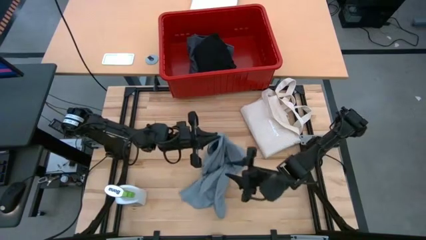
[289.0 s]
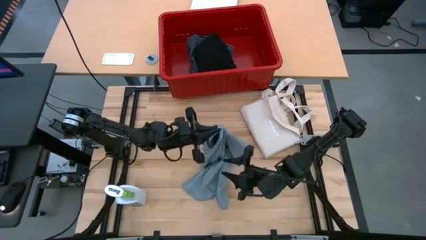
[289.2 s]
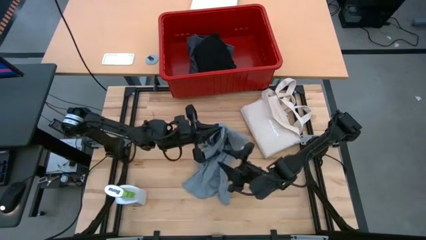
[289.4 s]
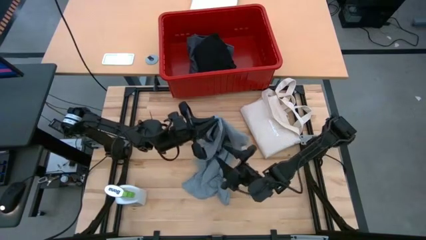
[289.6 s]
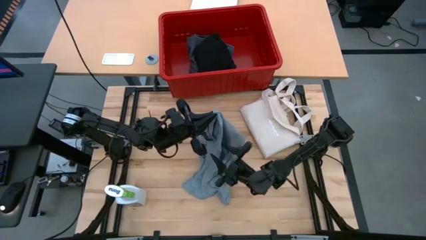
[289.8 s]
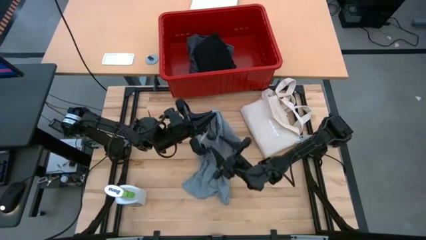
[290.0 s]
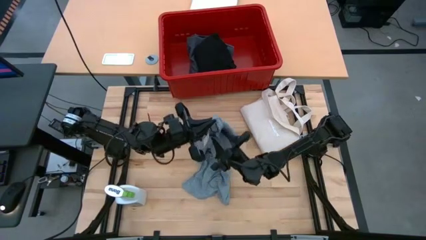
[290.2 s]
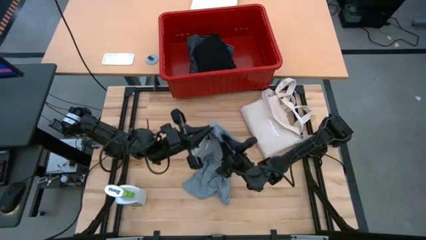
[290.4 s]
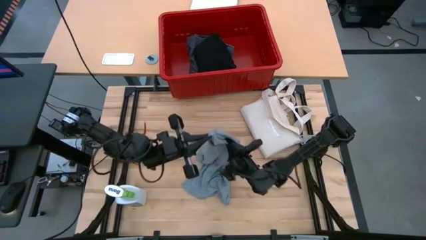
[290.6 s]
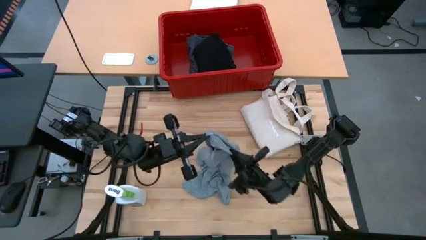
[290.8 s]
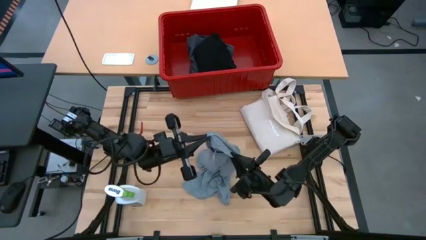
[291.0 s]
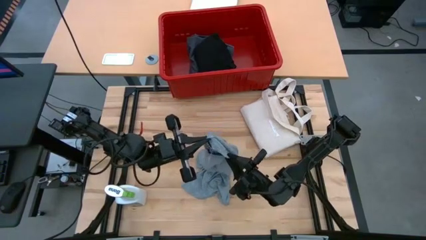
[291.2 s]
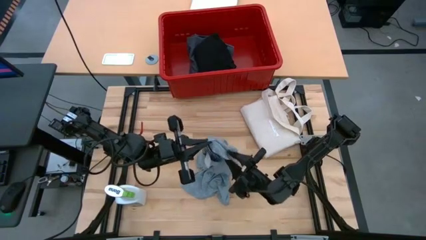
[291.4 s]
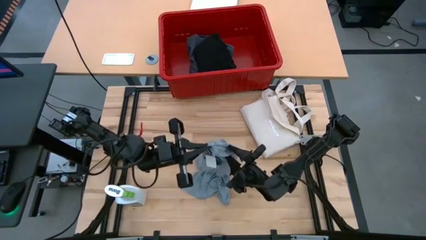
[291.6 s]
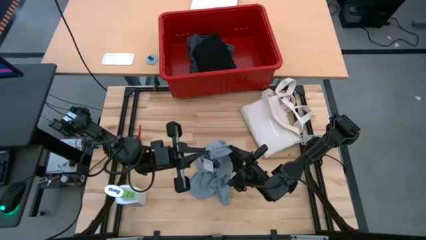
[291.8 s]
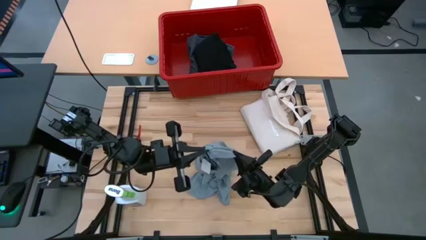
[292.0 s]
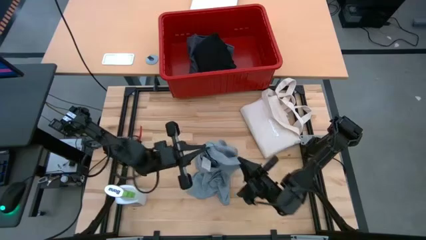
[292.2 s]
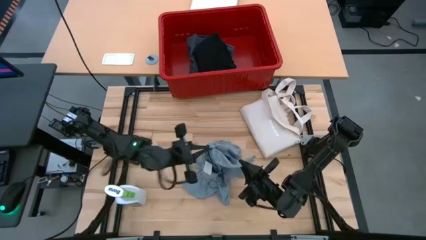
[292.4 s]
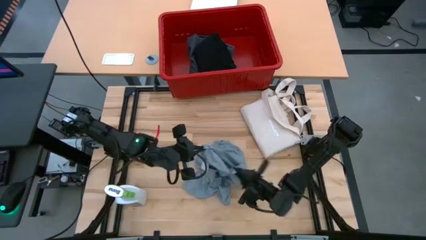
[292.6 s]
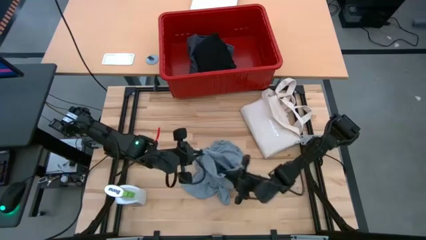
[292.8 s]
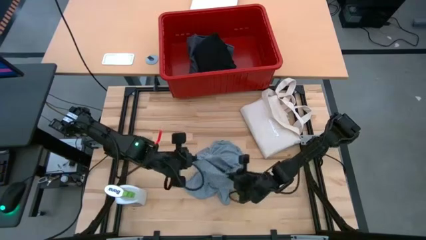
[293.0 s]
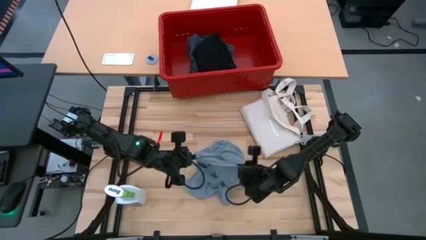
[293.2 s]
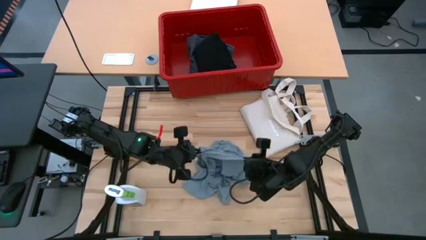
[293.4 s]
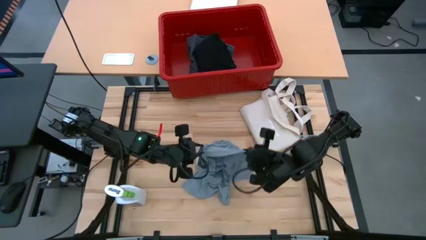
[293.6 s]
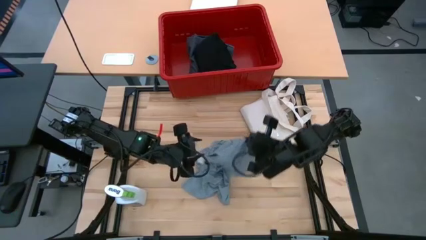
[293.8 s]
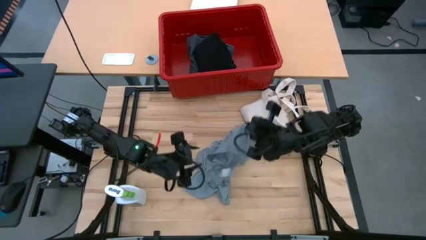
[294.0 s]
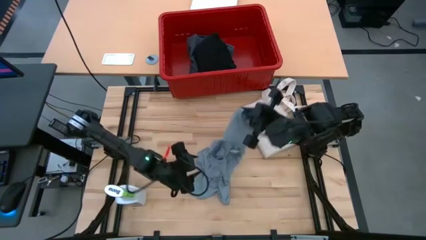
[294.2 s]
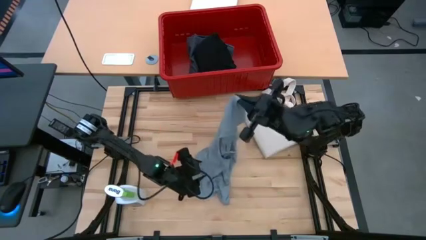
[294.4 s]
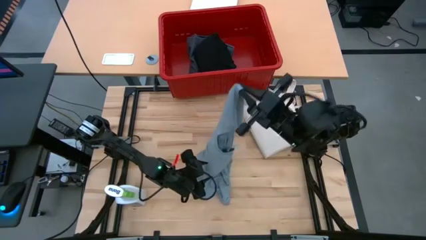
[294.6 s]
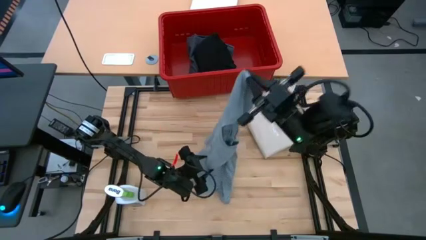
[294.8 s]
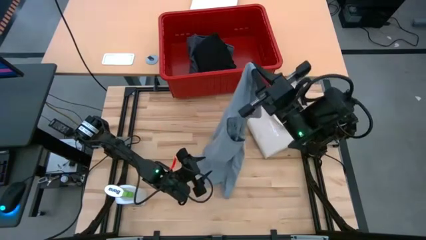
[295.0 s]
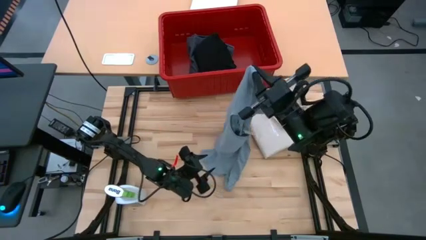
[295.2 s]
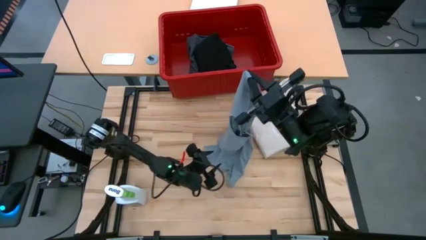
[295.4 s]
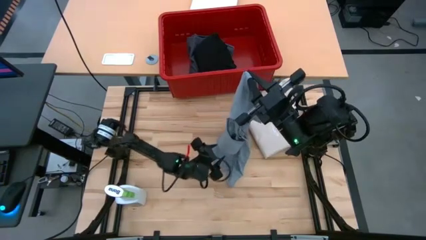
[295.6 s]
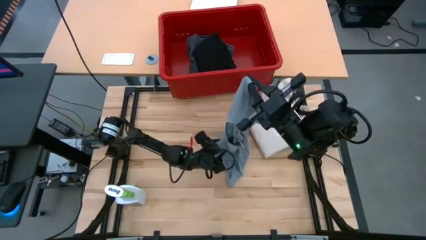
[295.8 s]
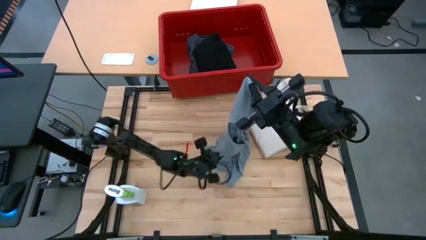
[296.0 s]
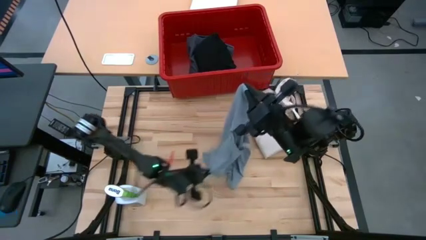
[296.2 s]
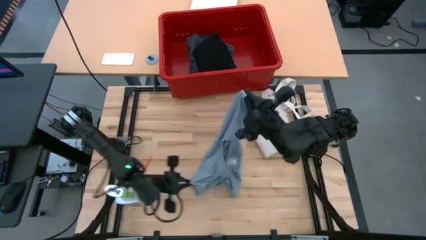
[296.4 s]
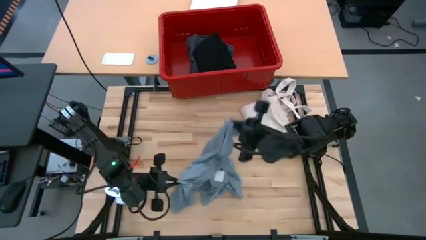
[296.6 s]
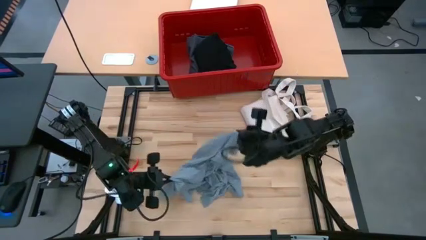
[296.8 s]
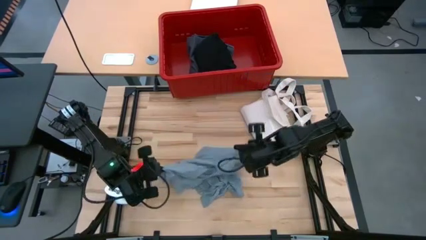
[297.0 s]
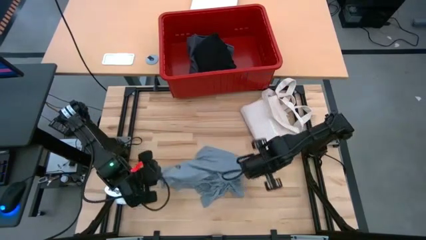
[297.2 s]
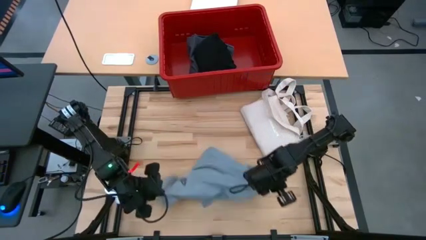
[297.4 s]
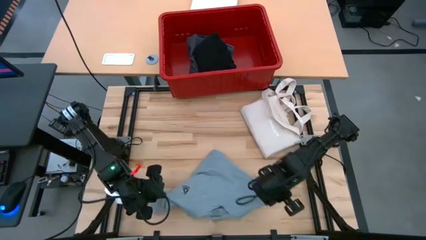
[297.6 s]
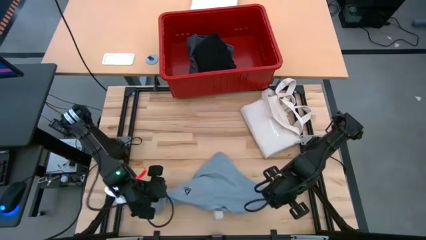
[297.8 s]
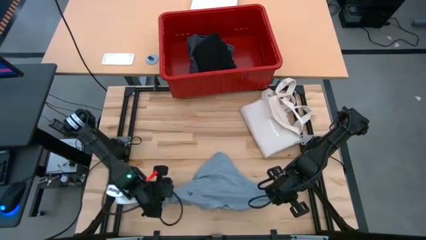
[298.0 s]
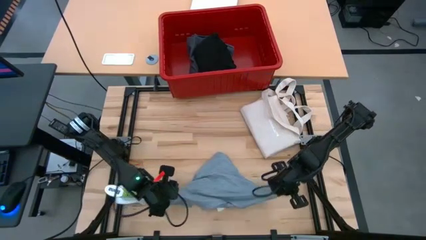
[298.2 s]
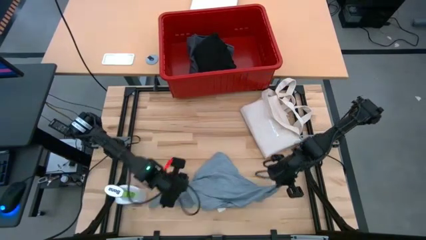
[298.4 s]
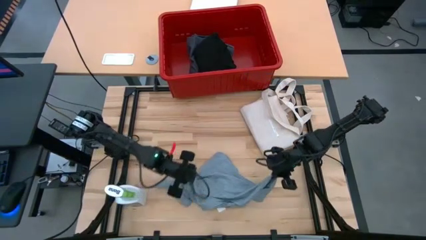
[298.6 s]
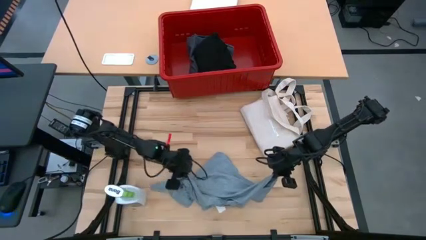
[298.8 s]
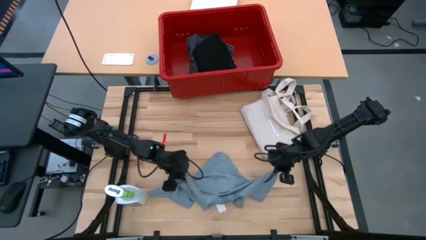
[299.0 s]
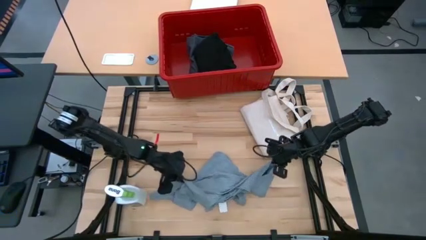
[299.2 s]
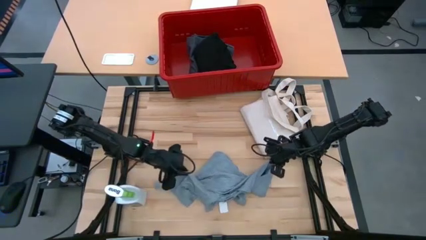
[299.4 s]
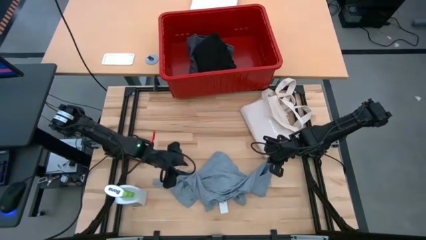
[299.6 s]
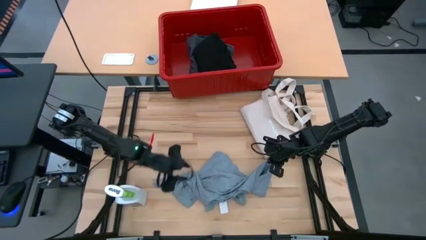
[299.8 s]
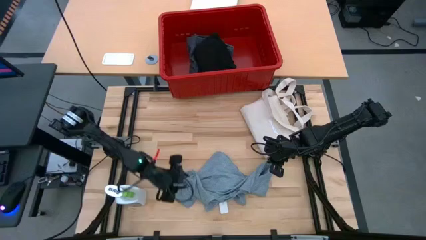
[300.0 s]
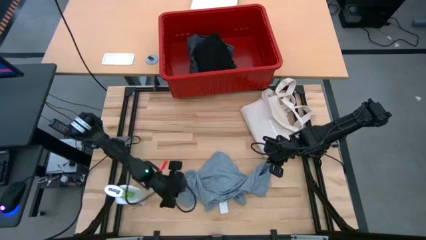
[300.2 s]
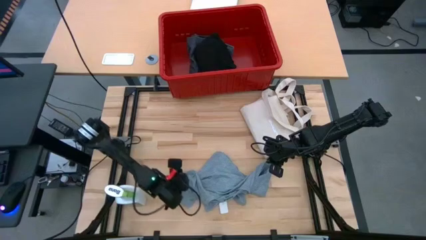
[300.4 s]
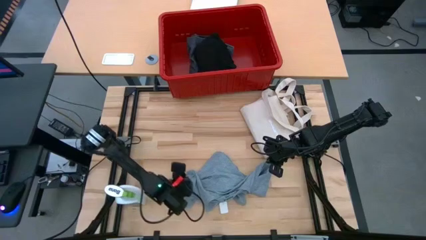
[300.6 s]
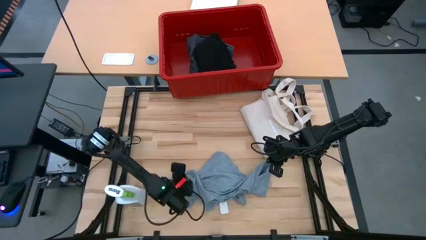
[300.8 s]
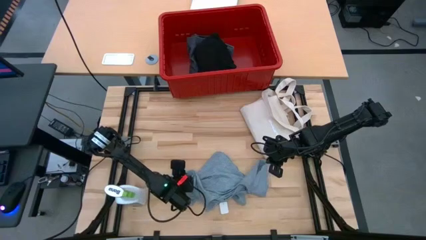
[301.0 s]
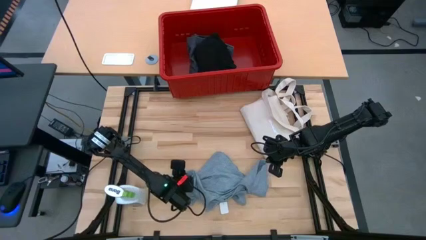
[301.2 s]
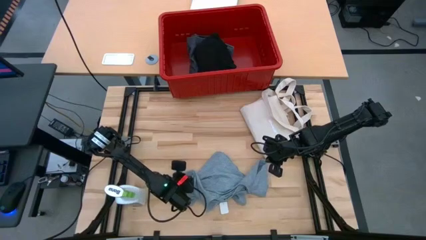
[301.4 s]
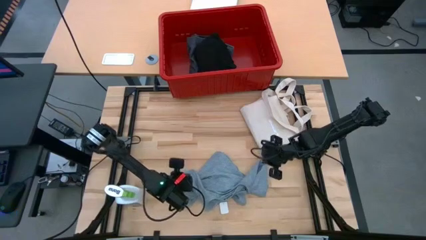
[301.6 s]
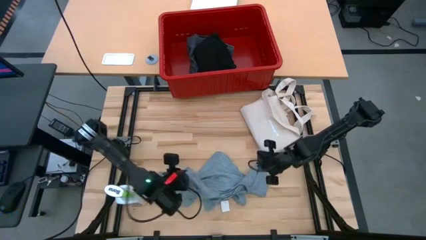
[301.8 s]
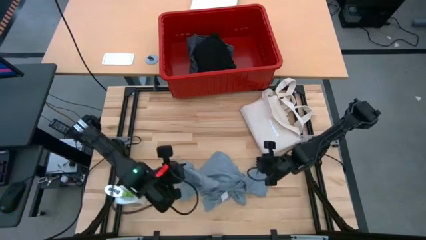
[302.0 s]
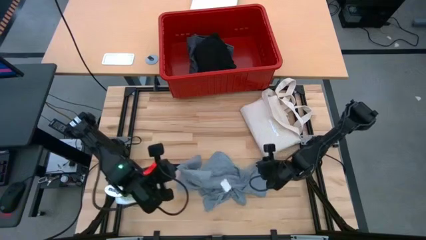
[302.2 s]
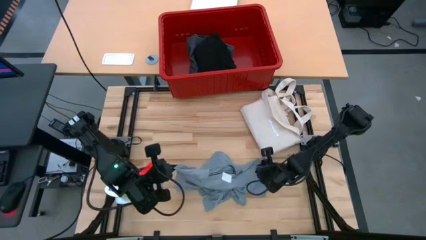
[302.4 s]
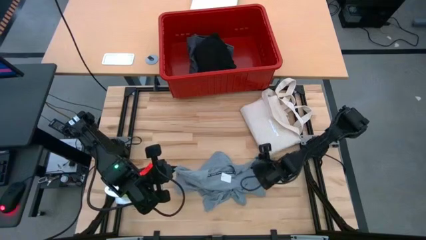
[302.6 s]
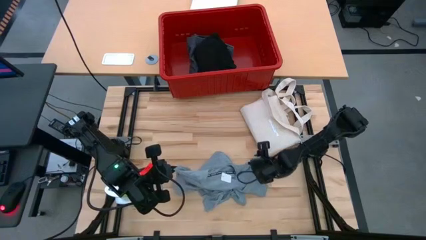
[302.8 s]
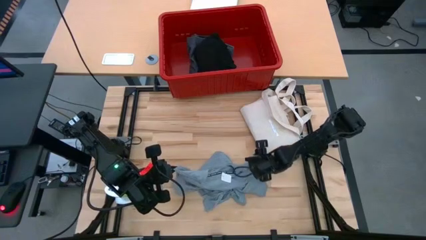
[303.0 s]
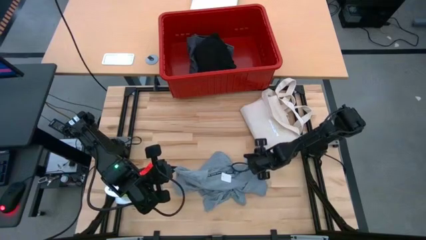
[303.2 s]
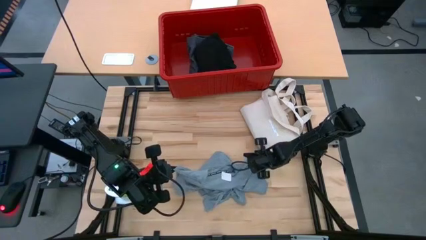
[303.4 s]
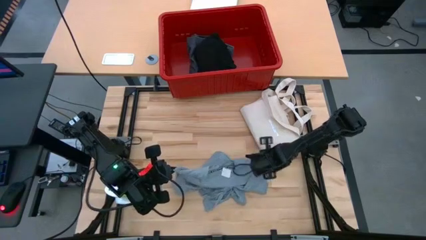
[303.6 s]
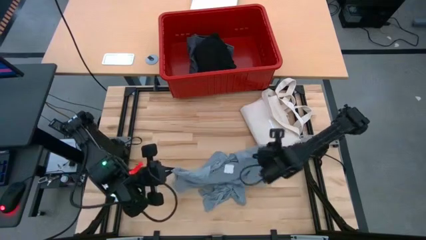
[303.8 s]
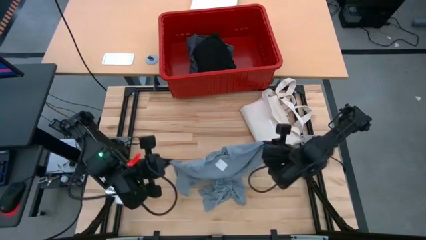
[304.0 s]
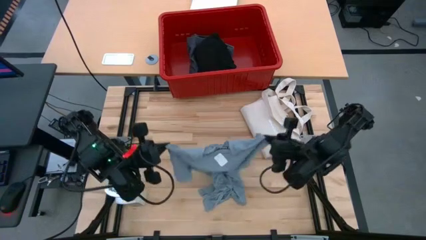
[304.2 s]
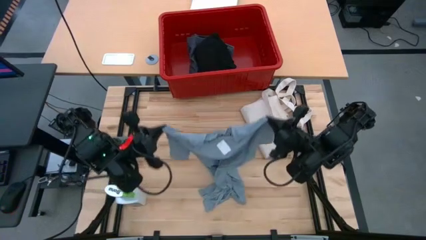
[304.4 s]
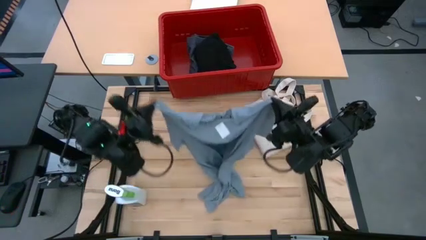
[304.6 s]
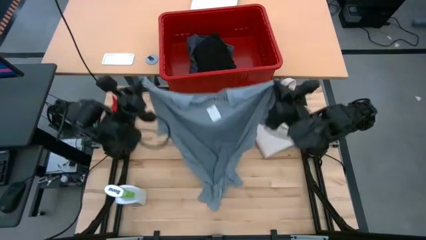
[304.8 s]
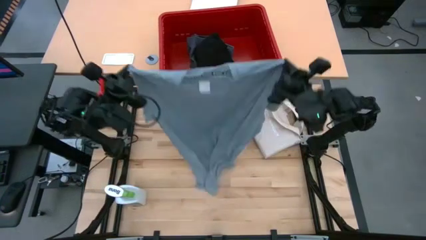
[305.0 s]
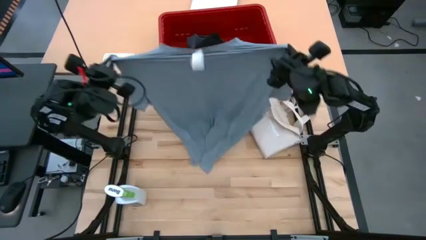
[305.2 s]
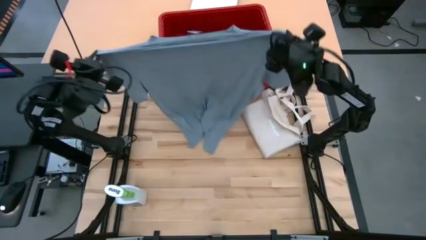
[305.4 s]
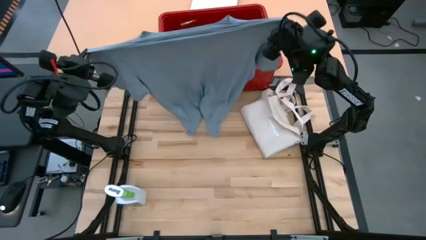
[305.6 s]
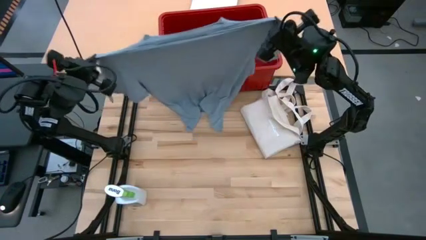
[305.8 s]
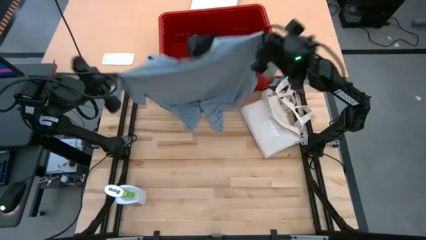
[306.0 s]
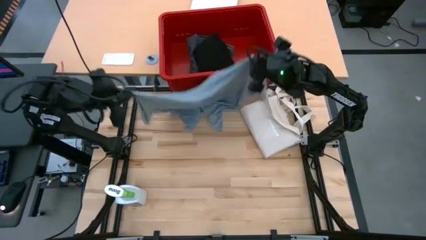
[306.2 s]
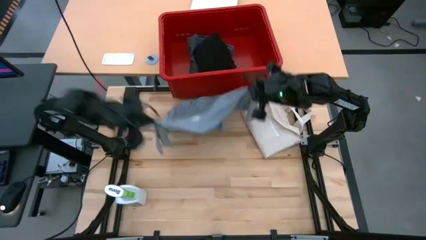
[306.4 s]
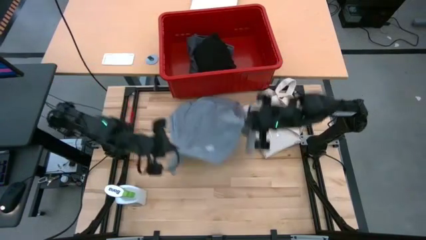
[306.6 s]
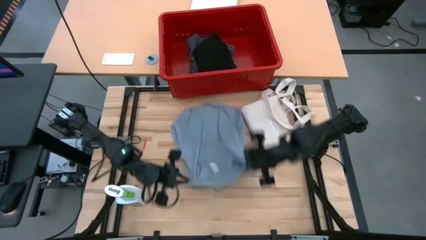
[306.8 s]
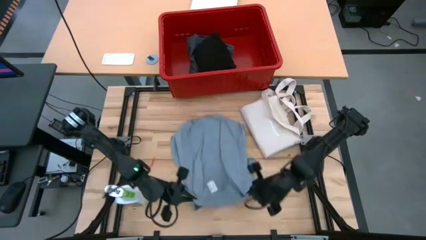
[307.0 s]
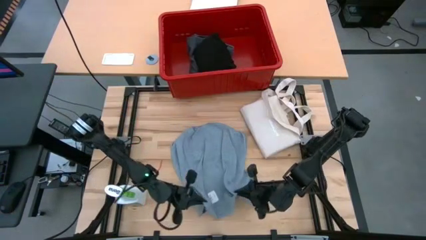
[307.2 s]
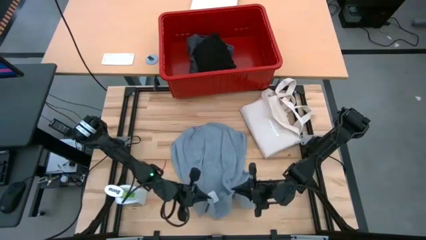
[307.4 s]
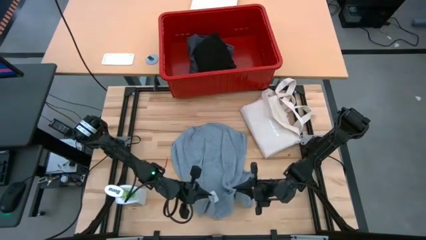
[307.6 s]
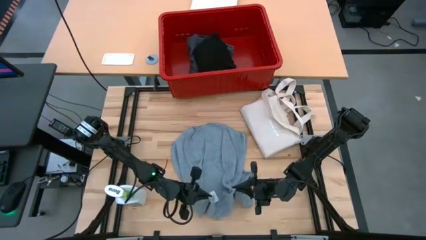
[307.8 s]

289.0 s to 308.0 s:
Task: Fold Laundry from Bin
Fold the gray shirt
